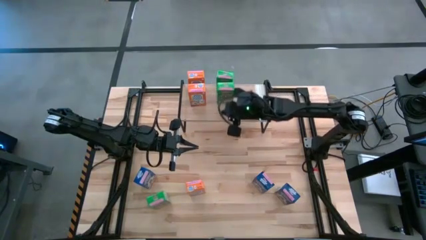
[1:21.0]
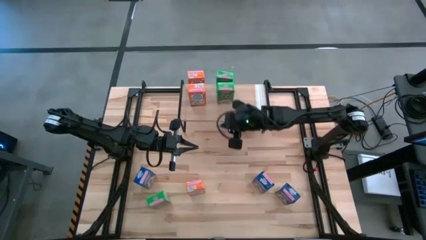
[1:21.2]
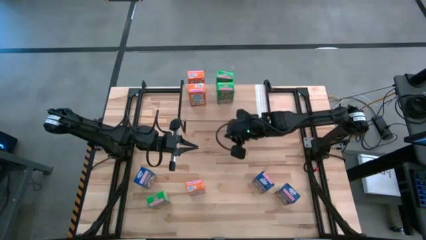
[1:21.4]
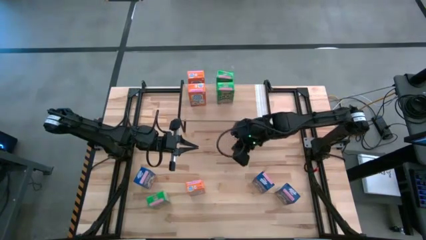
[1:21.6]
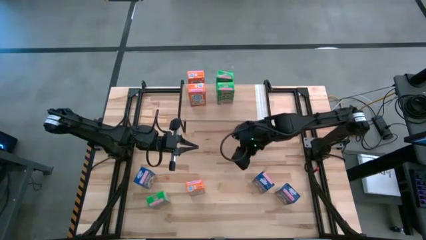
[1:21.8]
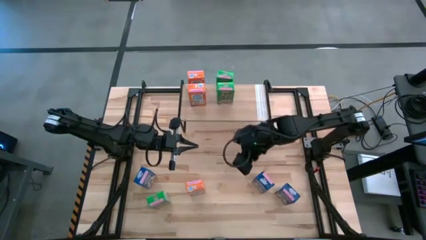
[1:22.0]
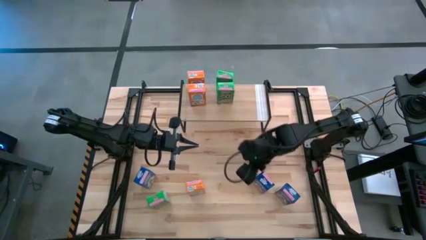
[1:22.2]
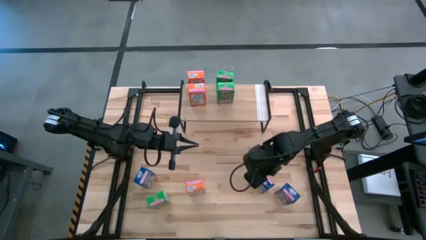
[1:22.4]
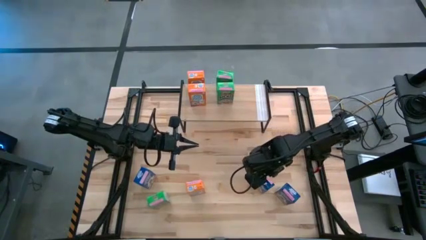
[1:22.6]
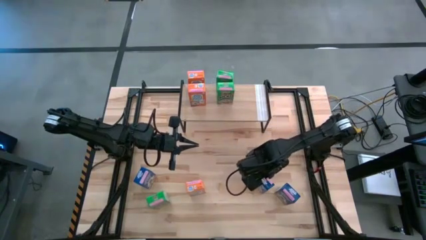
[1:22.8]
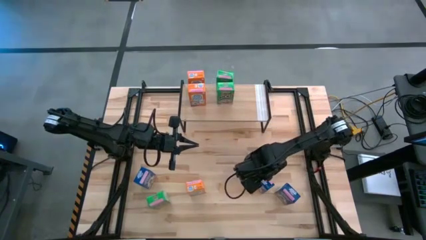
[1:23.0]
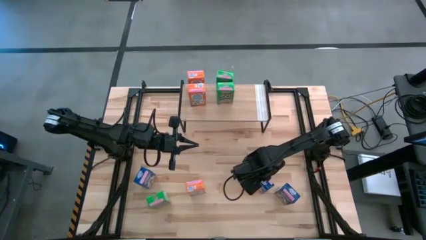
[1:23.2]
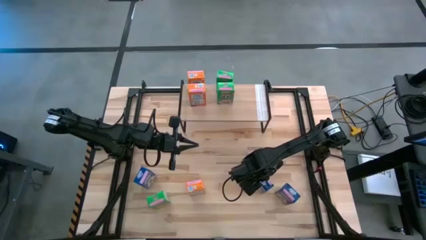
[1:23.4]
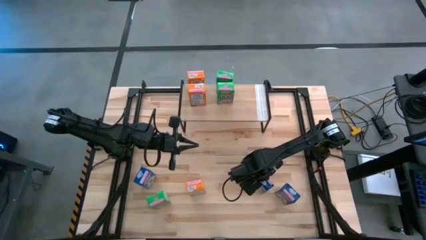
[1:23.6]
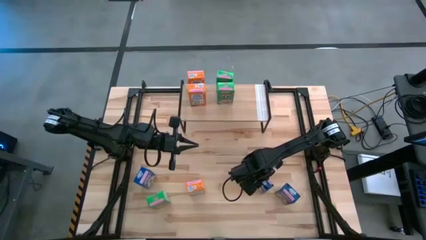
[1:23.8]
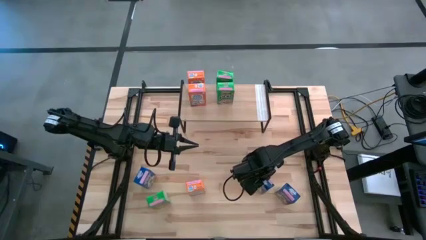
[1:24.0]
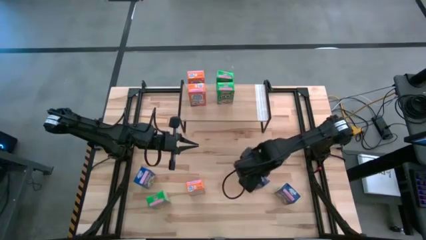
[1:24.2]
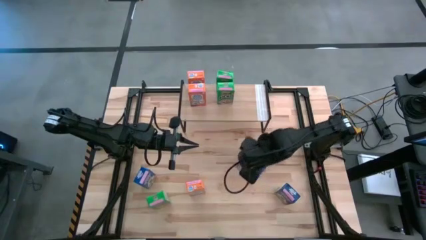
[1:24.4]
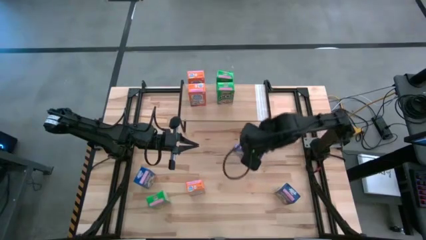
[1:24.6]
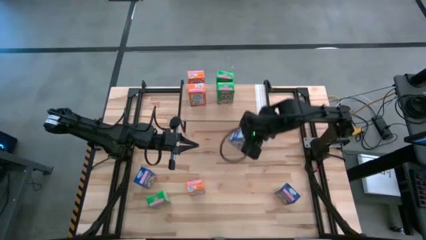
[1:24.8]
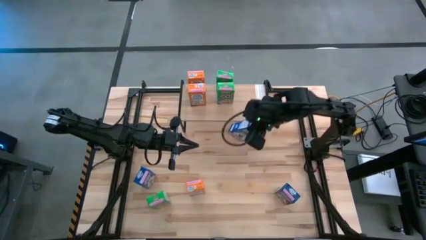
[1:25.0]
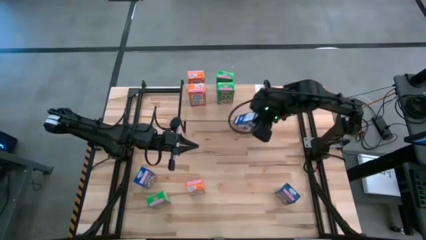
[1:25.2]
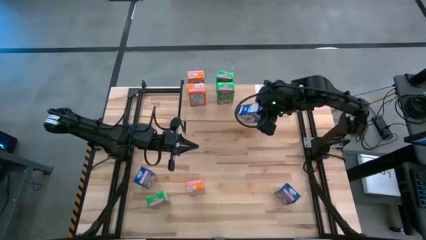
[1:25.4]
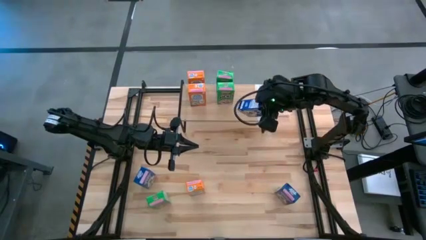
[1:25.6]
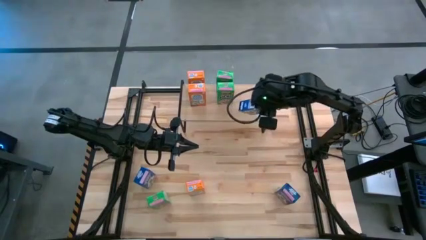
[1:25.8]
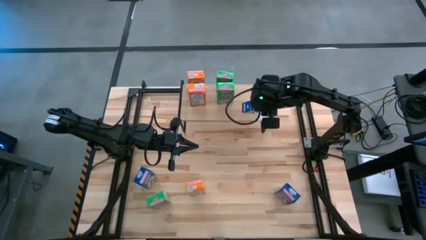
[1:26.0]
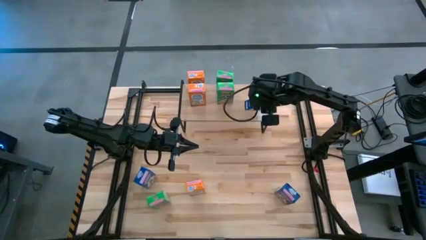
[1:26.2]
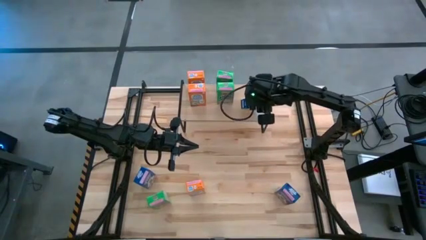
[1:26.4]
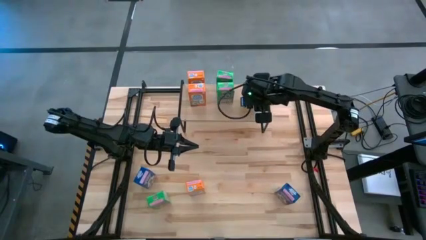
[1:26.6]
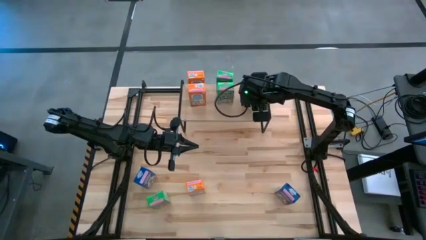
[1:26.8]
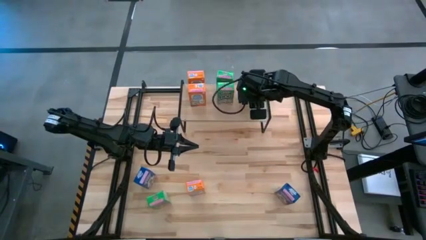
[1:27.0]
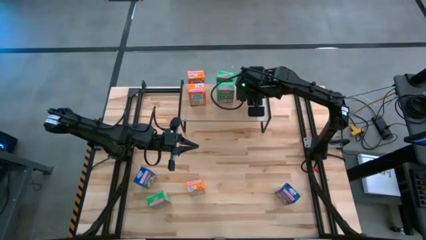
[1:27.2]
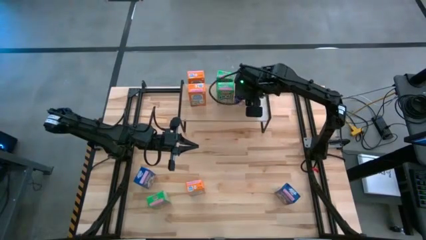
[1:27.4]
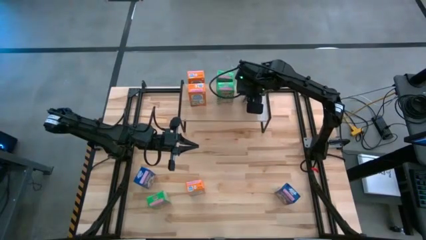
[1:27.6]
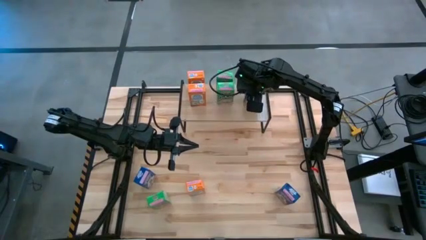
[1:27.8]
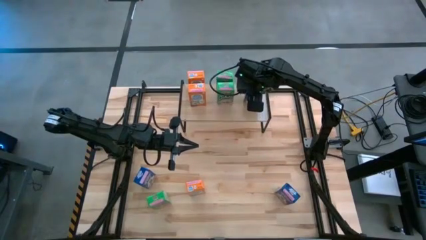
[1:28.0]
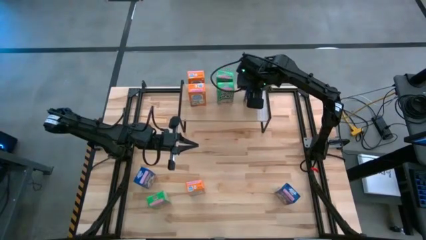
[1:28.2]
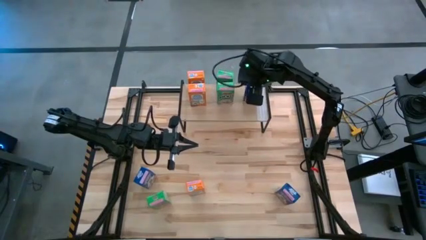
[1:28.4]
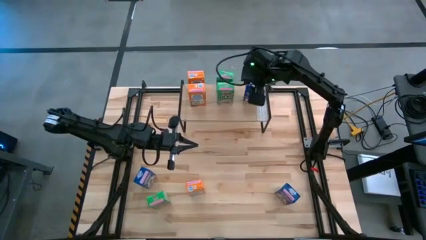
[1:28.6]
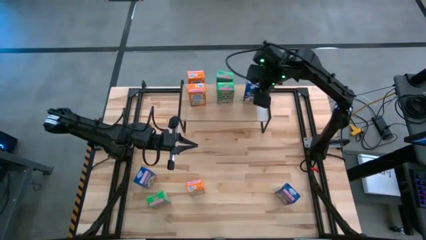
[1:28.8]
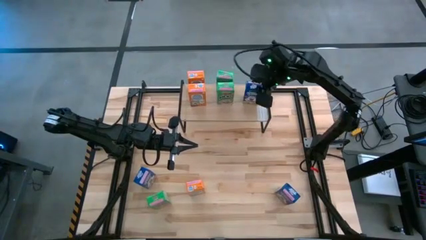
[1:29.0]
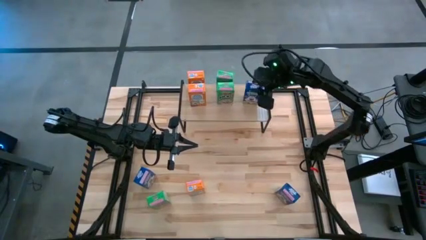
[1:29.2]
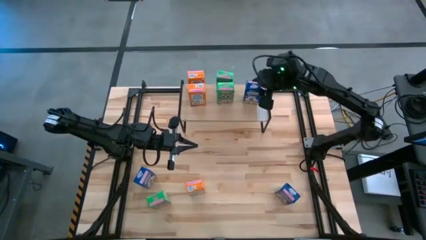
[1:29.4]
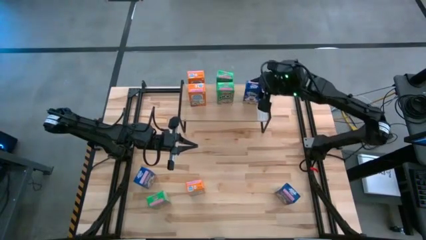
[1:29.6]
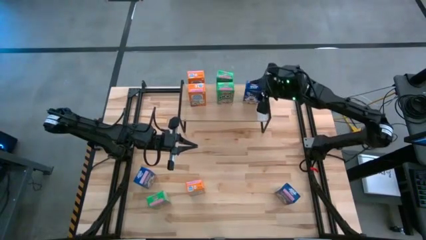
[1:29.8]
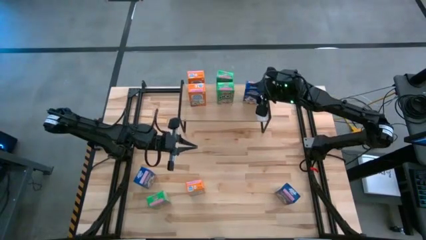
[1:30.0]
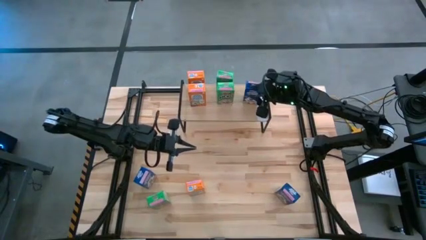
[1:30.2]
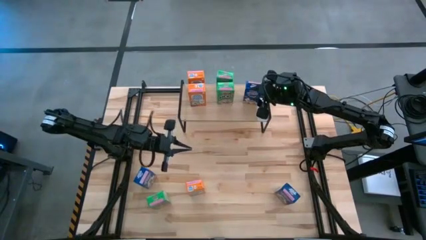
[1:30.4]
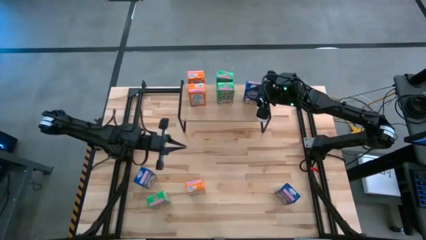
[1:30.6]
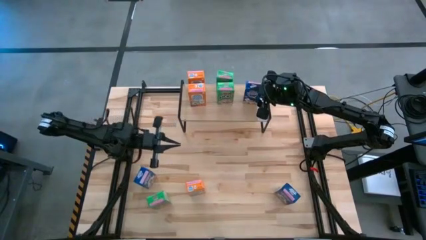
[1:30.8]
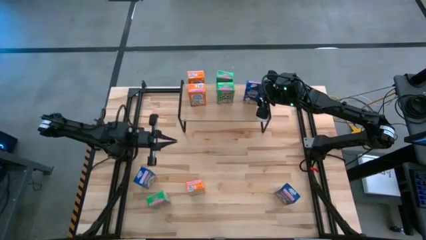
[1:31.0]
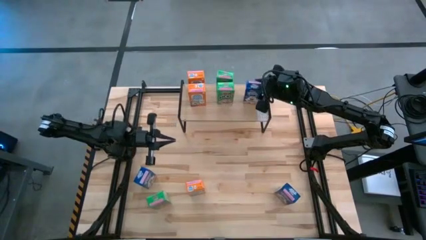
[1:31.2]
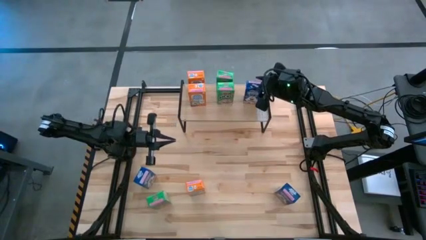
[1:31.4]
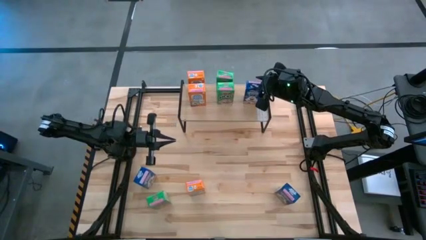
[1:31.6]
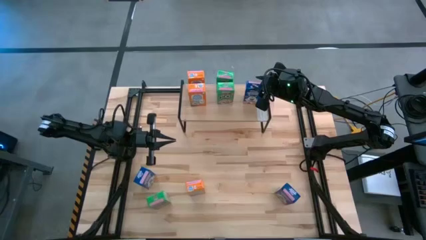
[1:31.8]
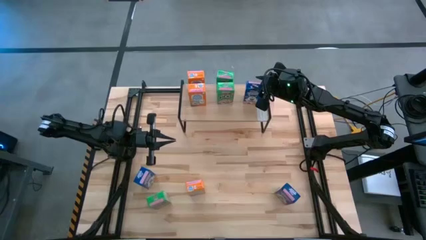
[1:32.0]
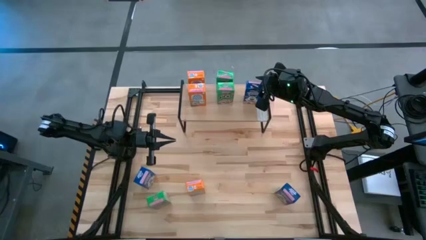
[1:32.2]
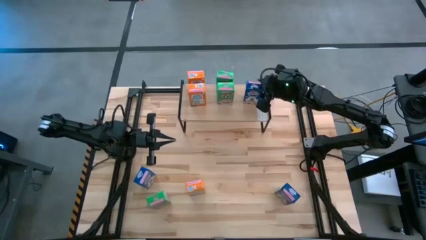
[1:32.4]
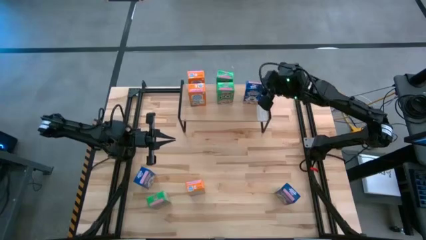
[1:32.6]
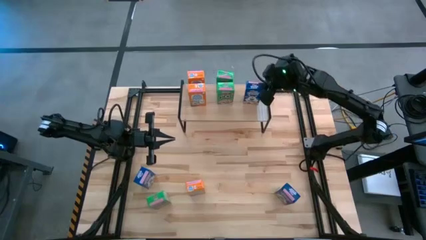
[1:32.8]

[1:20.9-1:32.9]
Task: Stack cereal on shelf
Put the top right blue cereal box on the shelf
